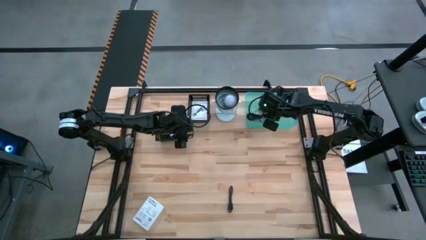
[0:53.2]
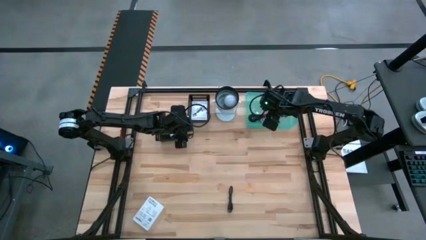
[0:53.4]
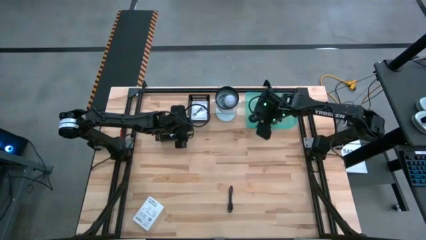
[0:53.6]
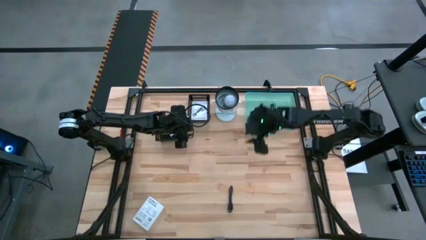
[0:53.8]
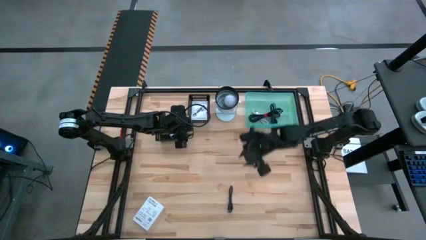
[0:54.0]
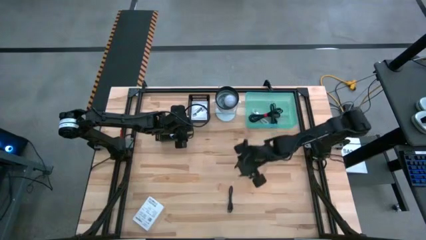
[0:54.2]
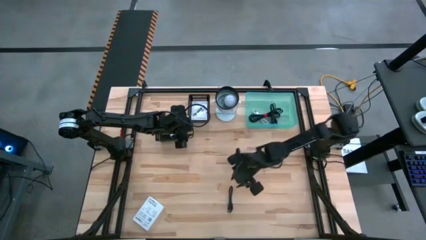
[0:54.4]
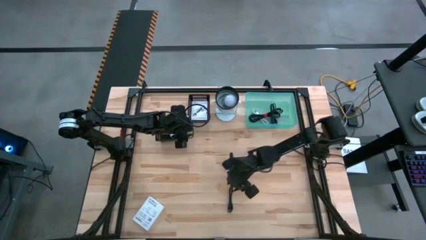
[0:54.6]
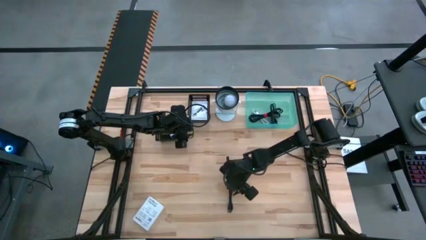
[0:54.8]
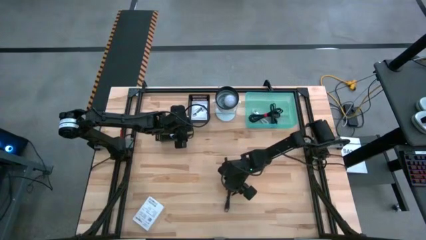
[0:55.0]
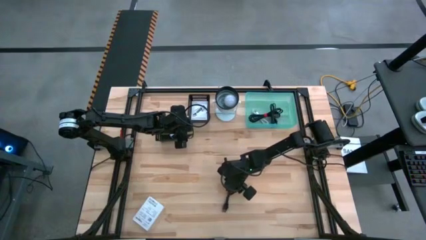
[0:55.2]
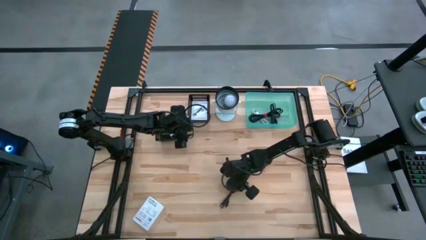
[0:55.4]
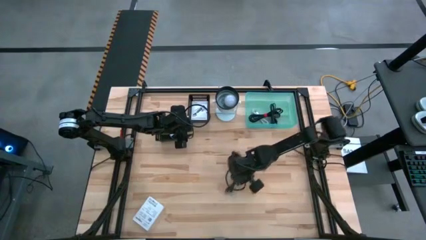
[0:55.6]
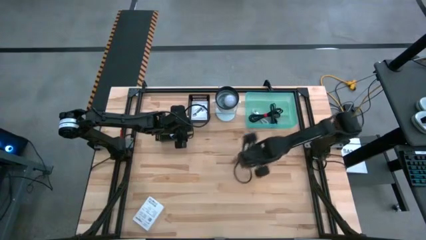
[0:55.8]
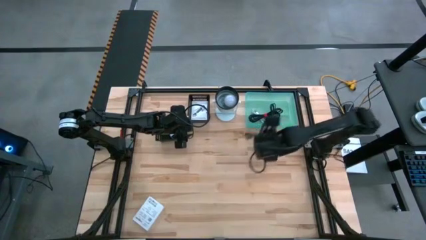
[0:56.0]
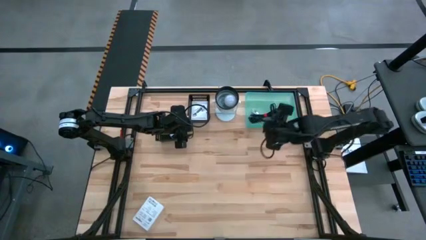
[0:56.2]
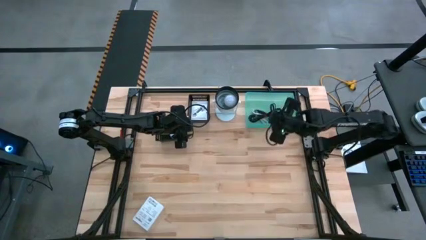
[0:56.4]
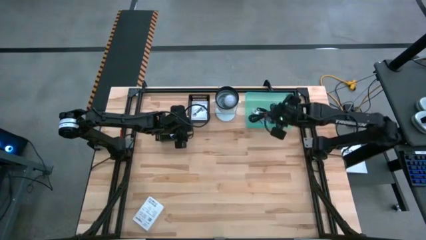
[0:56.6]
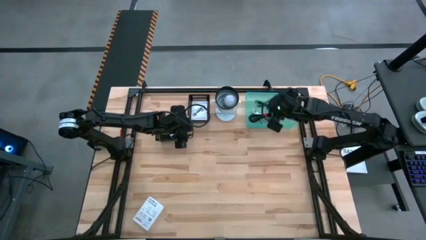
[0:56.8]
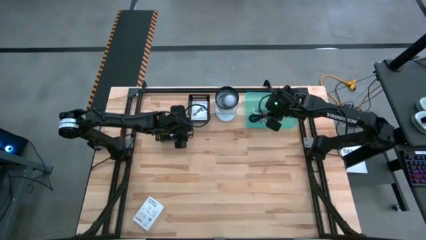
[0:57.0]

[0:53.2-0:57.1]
Task: Pick and place items into bin
Put the black charger cable into the green bin

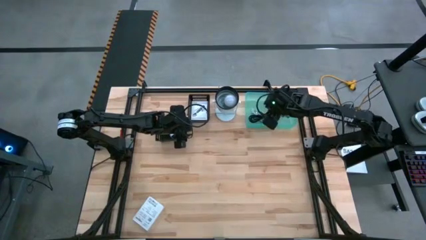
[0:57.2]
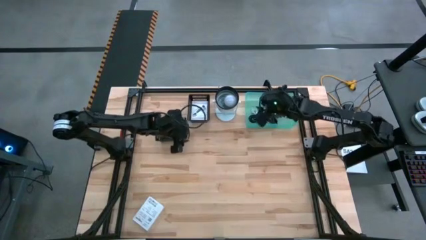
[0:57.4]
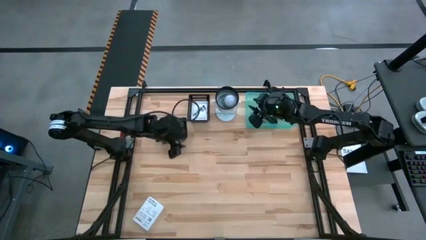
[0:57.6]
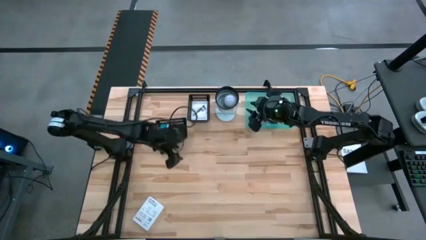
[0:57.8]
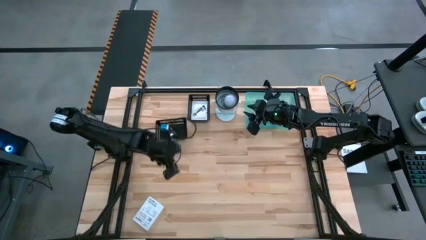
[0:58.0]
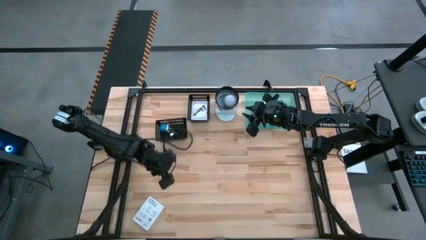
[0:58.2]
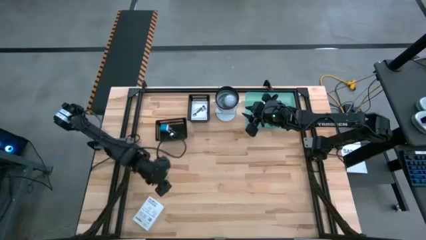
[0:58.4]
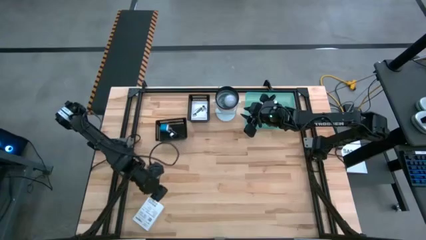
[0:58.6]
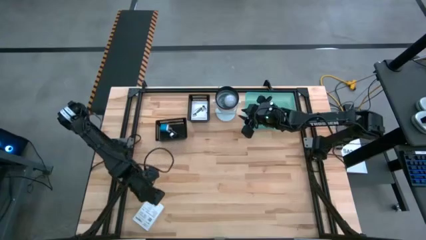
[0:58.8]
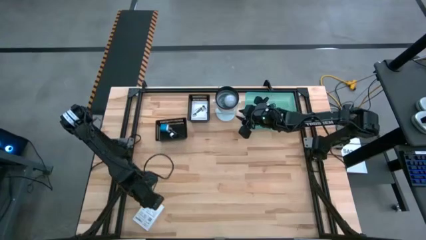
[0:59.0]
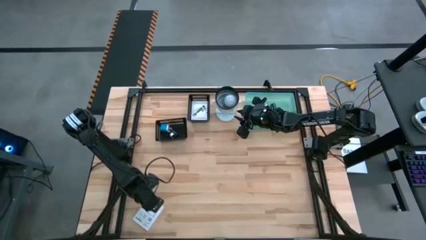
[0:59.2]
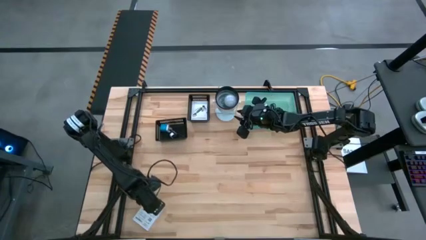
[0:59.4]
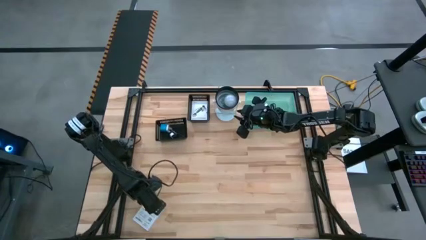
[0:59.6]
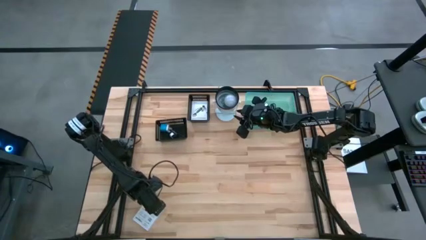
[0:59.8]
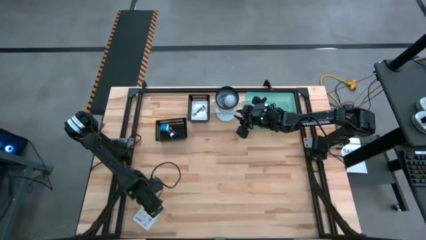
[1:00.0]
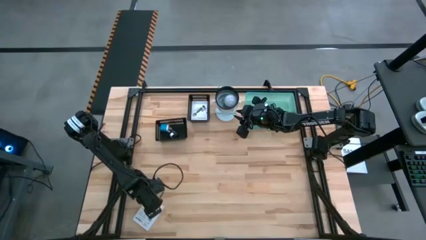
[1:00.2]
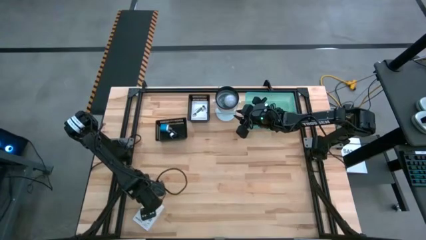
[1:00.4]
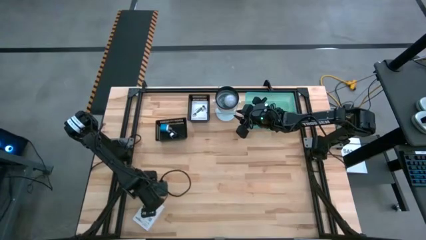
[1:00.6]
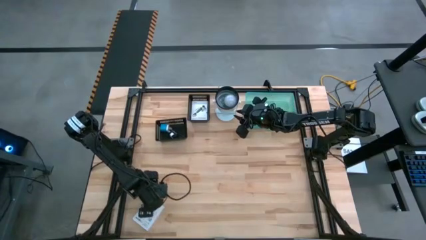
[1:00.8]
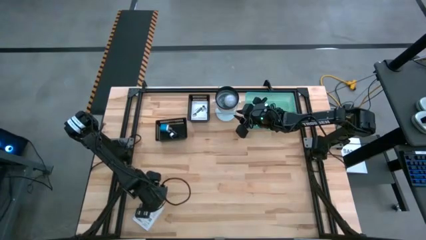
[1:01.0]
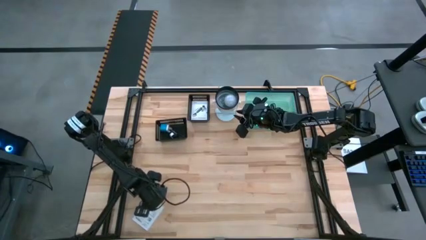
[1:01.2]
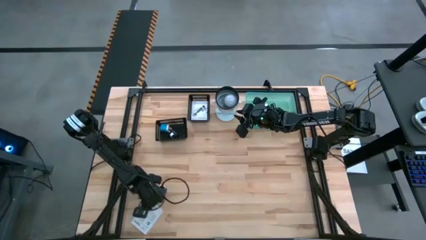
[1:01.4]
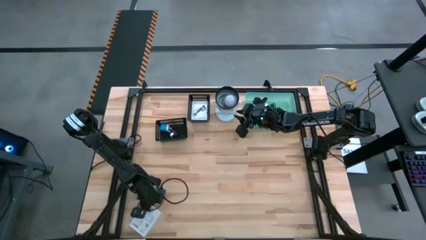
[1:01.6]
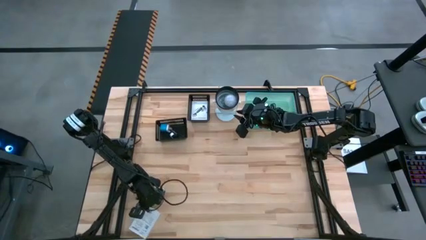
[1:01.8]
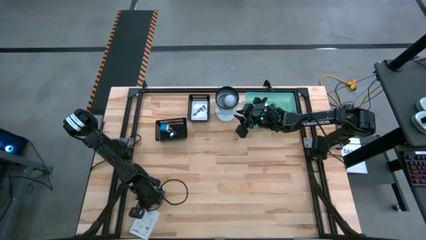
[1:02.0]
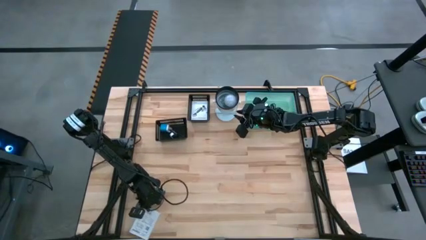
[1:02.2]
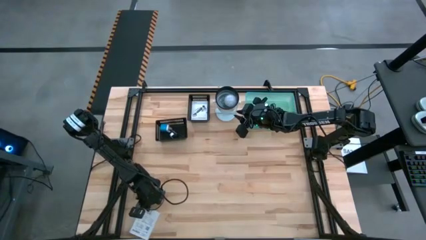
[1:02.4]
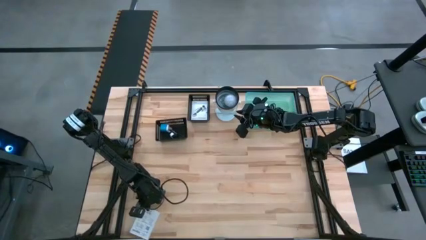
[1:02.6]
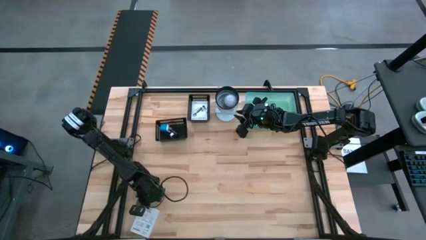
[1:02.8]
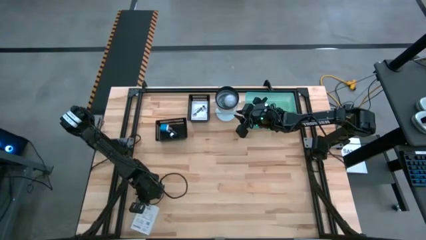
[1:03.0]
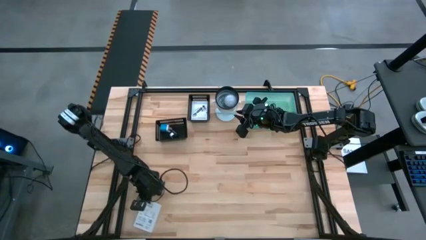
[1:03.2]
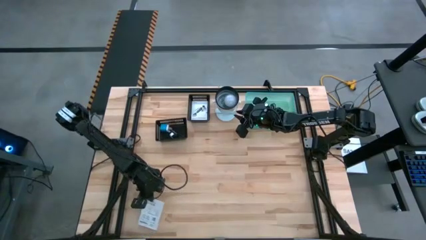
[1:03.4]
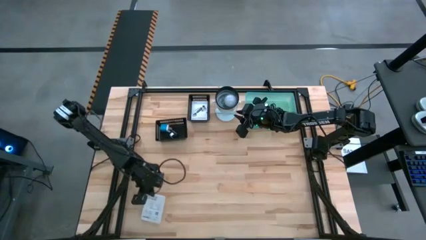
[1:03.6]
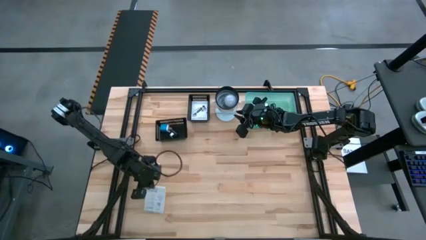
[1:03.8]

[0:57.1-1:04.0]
Put the white box into the top black bin
